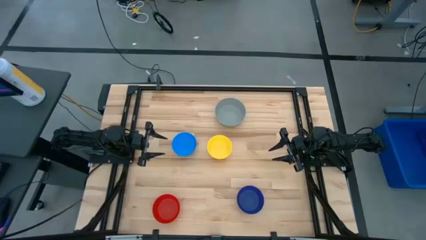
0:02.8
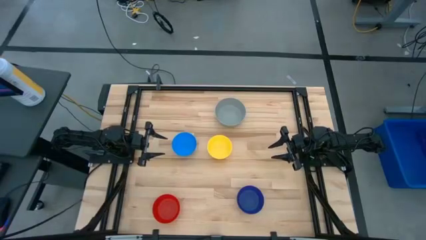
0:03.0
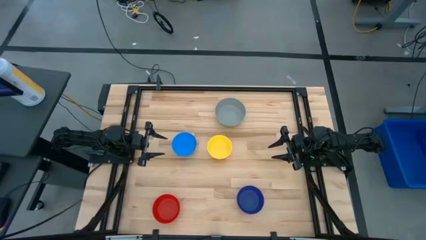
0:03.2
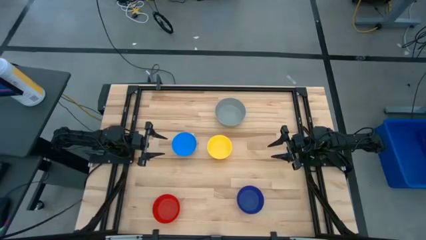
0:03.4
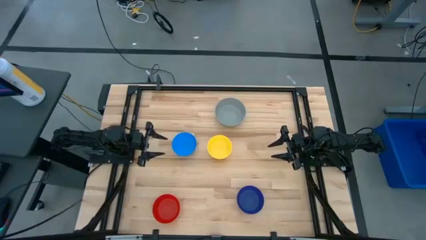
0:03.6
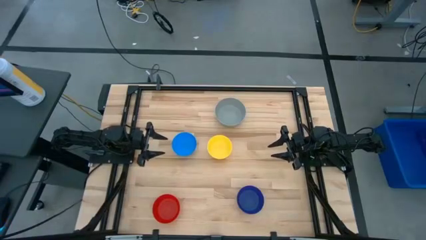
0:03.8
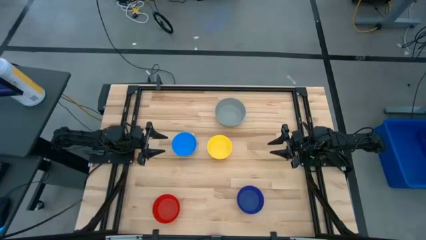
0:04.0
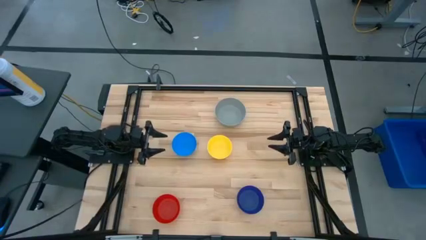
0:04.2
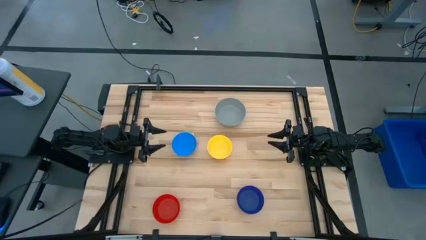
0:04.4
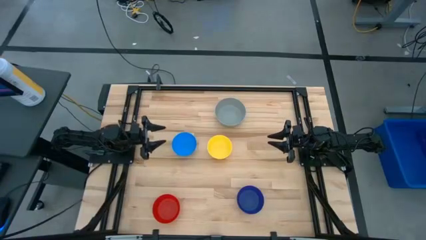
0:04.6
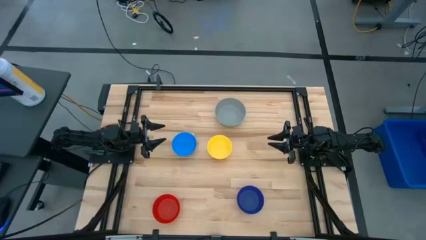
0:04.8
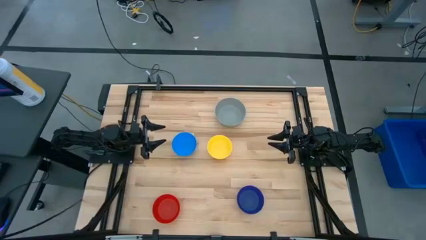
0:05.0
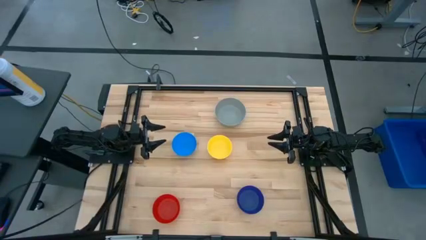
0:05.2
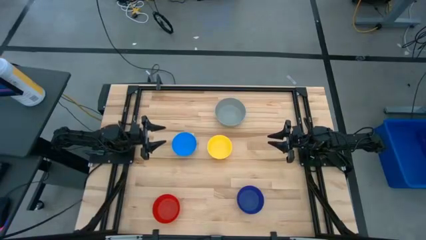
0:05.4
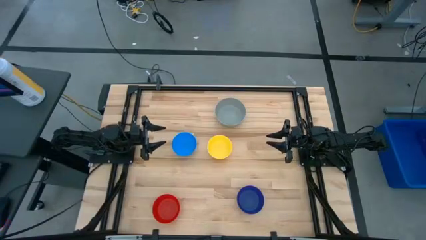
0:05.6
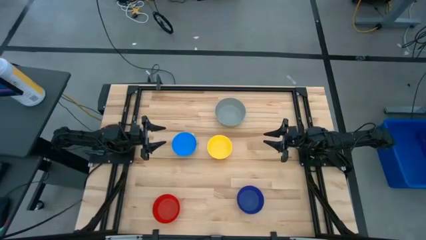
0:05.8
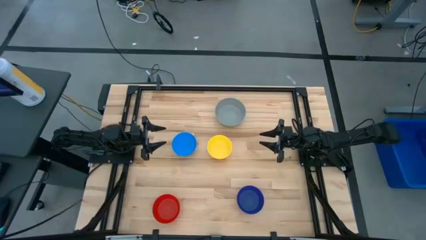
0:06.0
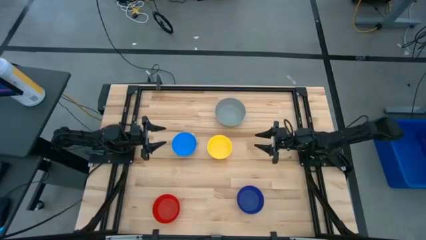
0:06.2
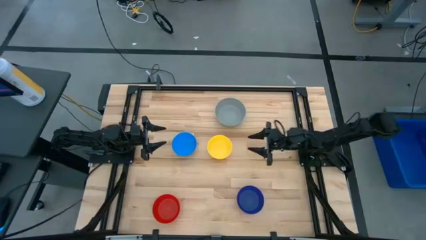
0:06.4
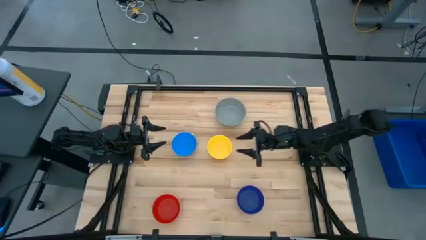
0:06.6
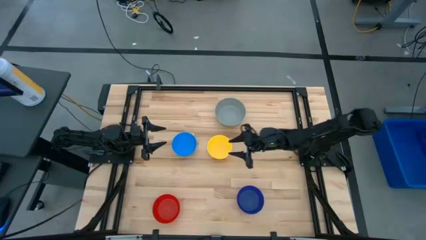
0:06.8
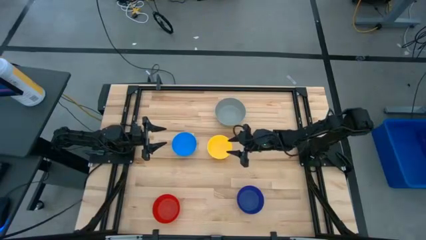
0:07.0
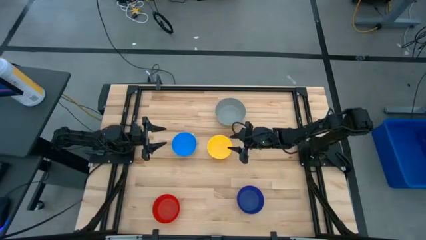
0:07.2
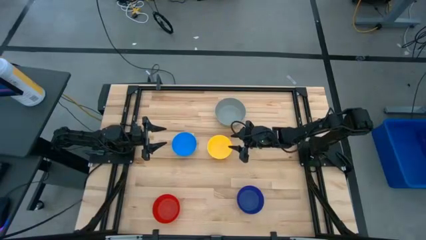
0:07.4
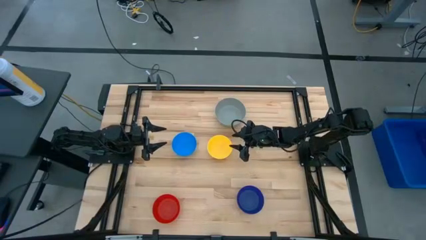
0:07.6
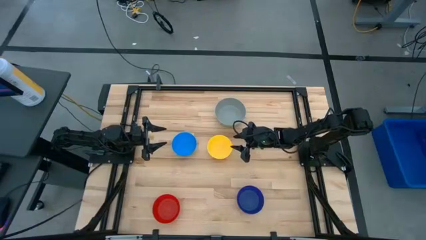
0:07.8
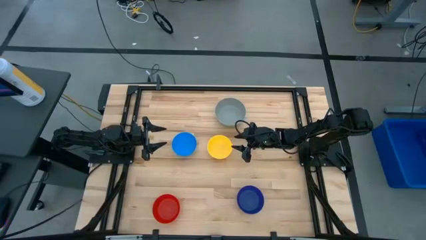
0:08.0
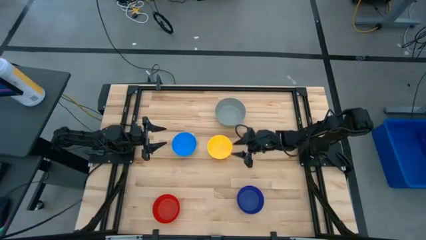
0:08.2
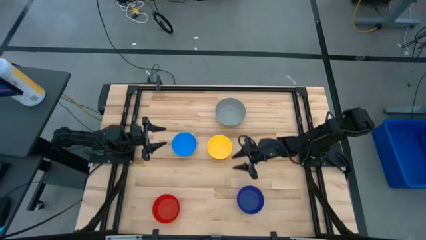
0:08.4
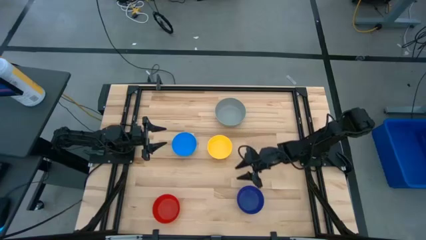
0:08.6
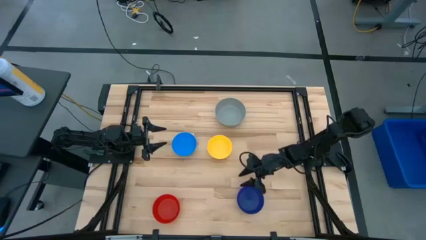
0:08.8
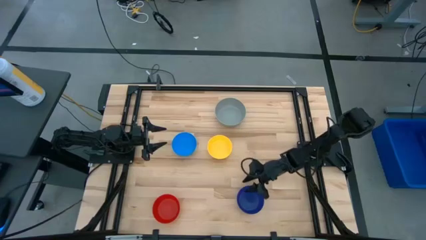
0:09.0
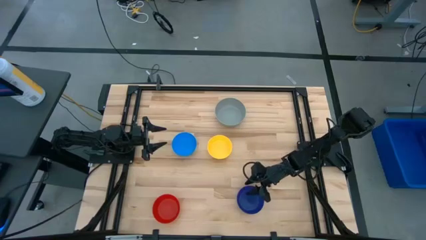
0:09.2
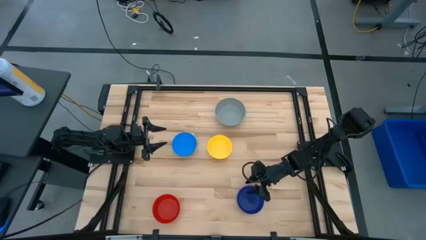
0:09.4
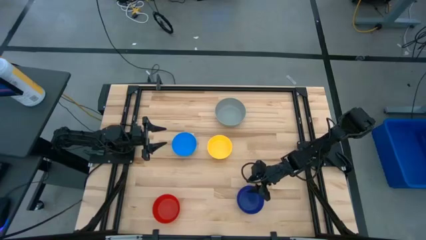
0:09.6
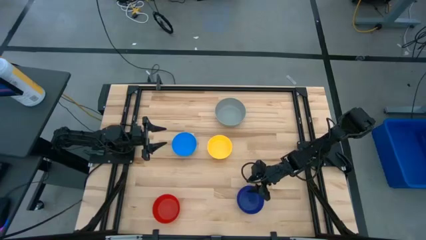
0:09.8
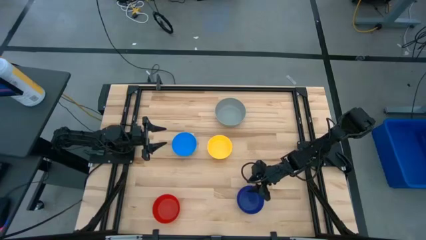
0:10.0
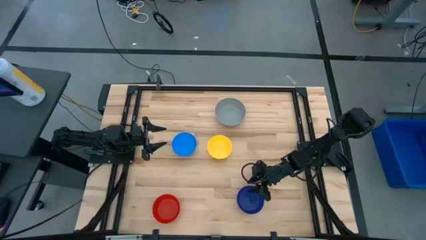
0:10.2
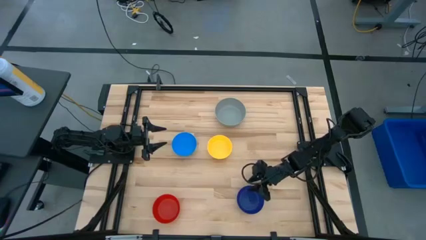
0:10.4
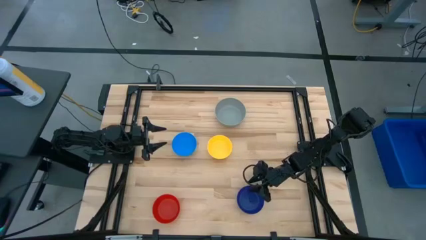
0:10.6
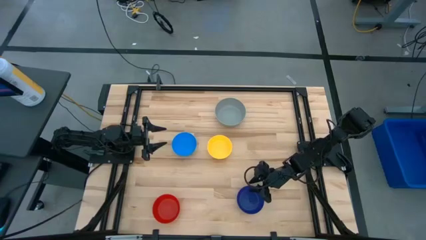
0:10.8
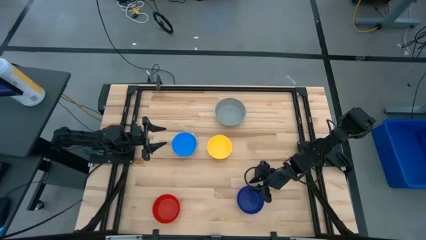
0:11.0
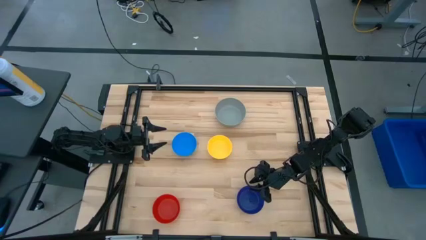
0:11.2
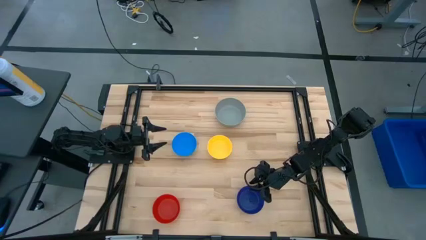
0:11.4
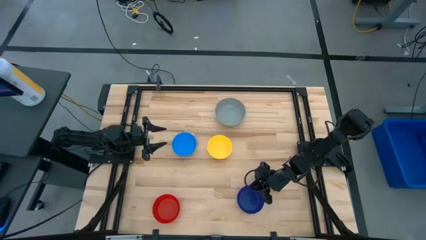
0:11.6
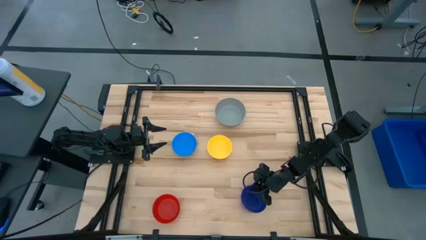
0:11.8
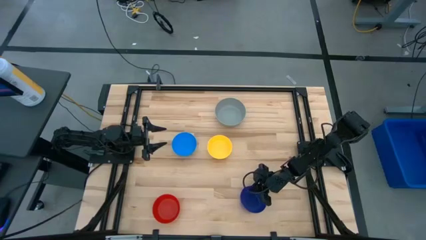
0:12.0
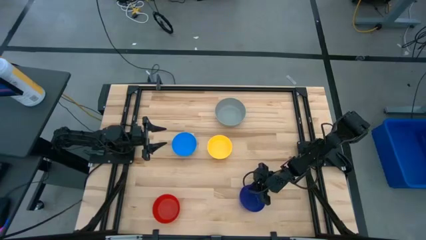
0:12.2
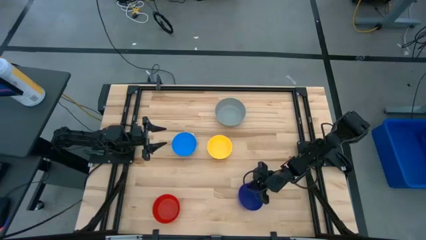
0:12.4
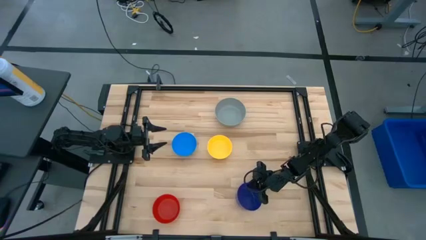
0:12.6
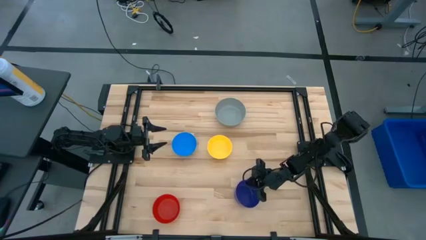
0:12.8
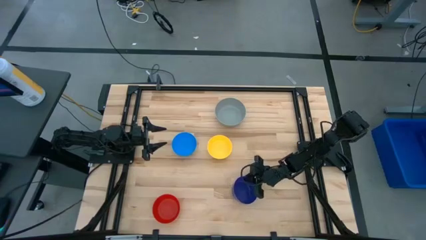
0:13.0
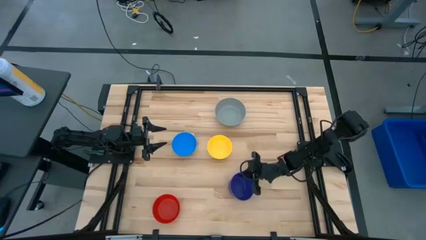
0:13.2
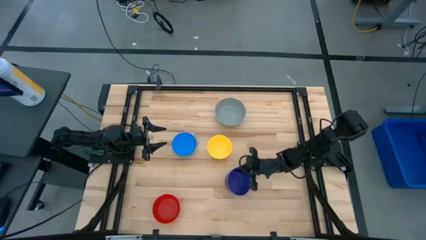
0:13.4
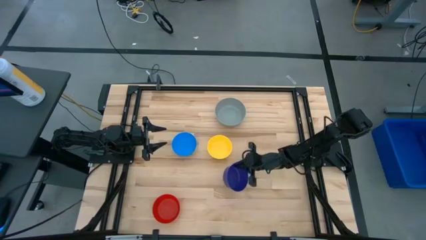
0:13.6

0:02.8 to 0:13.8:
Stack the dark blue bowl on the gray bowl
